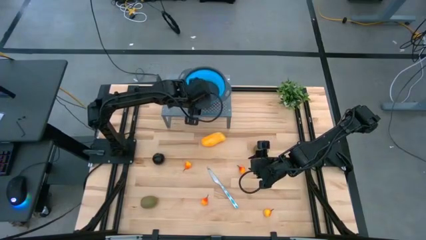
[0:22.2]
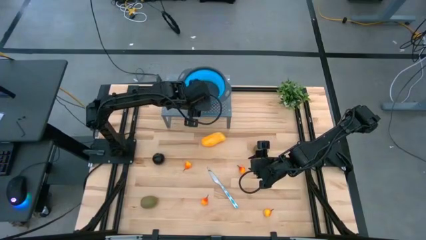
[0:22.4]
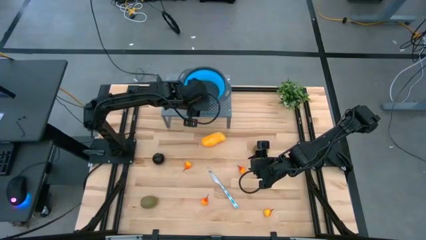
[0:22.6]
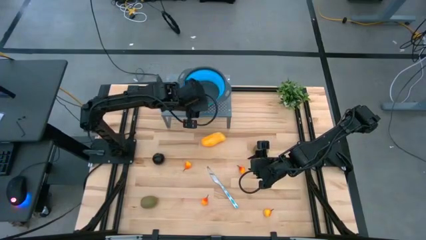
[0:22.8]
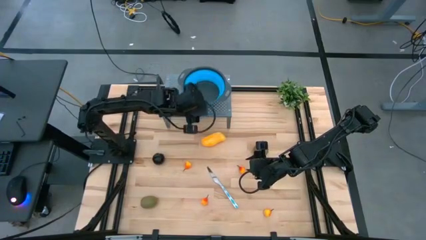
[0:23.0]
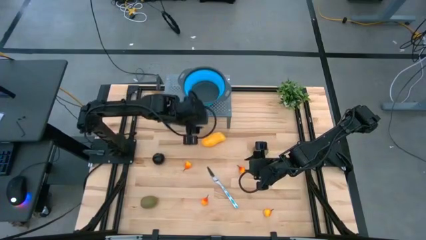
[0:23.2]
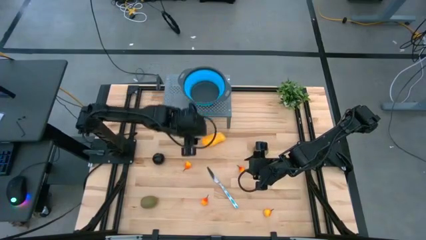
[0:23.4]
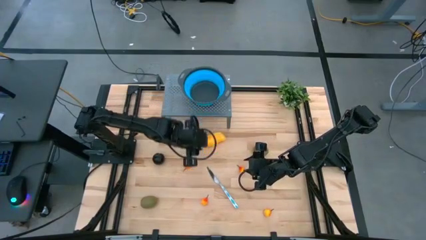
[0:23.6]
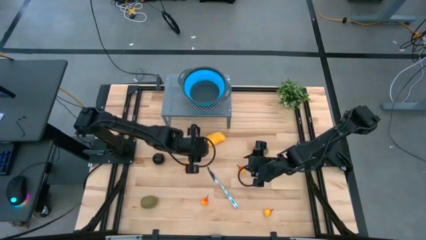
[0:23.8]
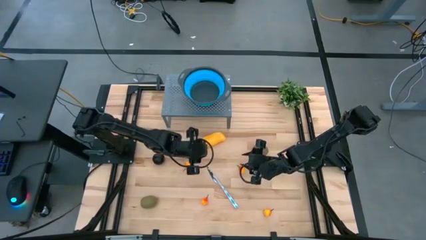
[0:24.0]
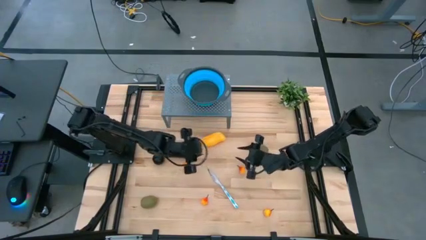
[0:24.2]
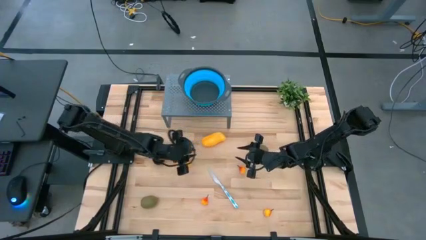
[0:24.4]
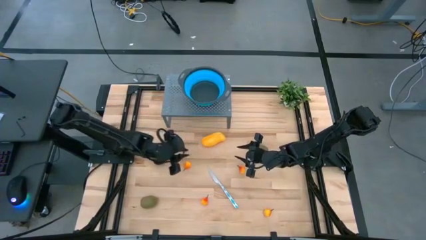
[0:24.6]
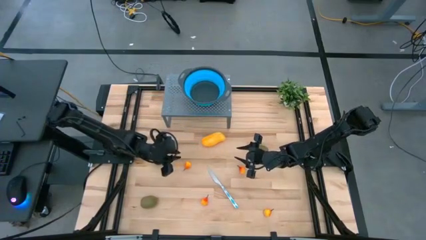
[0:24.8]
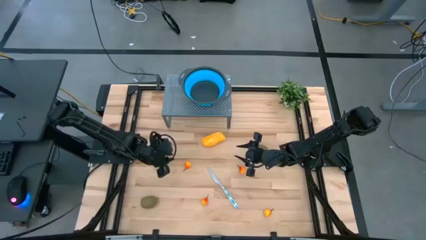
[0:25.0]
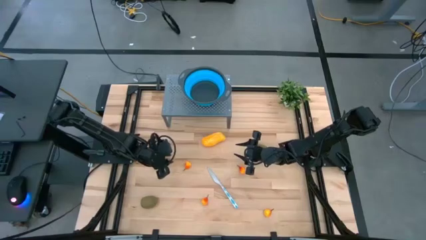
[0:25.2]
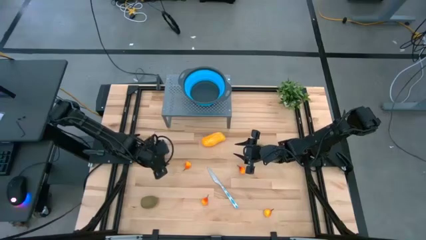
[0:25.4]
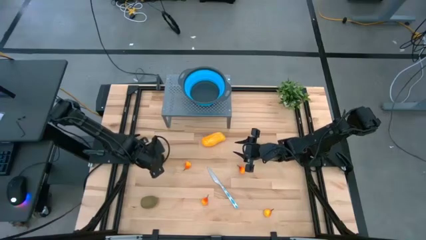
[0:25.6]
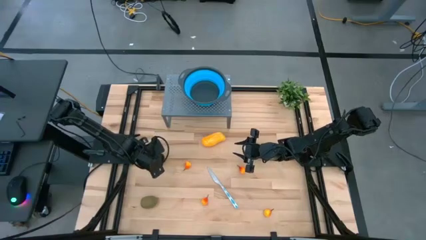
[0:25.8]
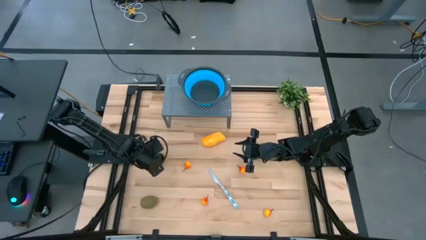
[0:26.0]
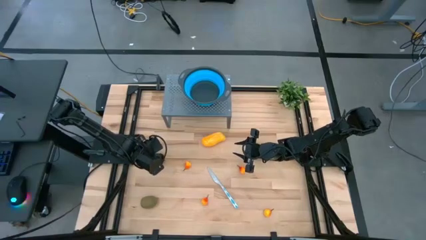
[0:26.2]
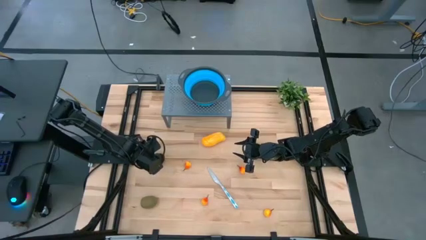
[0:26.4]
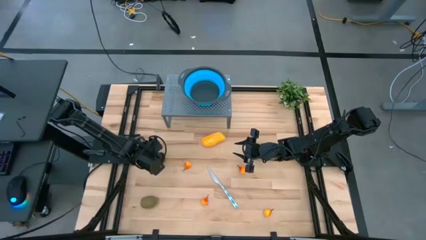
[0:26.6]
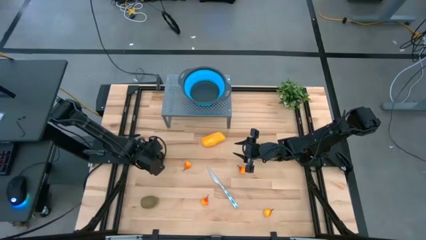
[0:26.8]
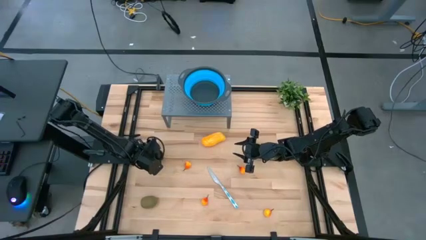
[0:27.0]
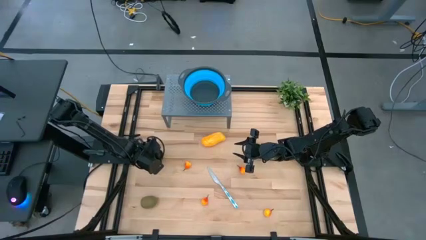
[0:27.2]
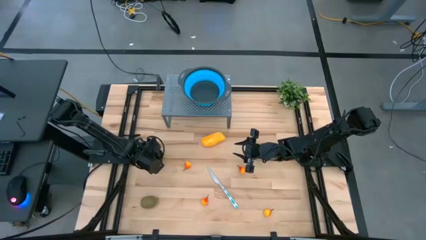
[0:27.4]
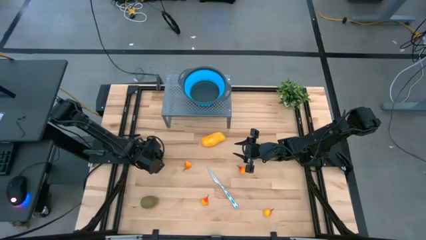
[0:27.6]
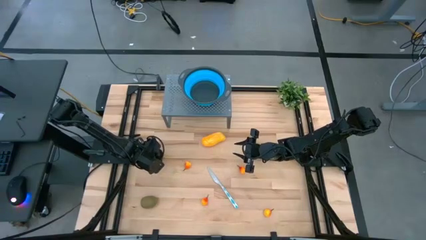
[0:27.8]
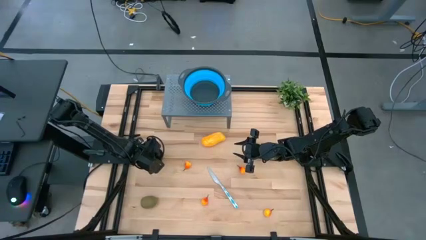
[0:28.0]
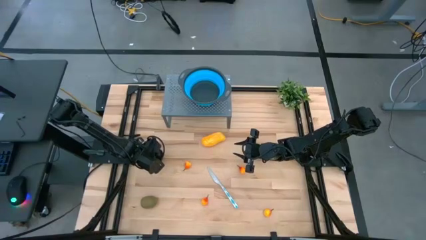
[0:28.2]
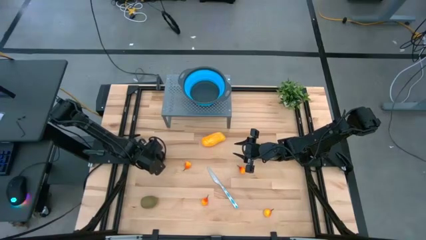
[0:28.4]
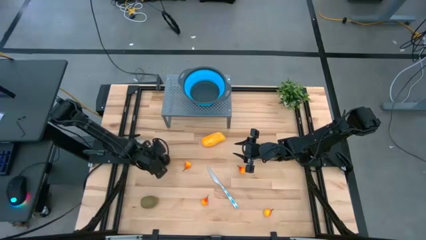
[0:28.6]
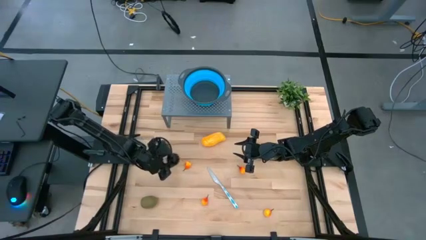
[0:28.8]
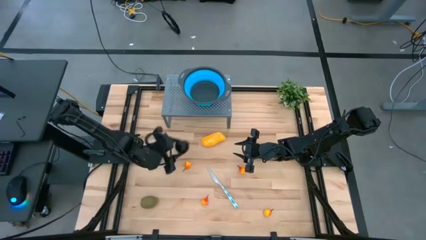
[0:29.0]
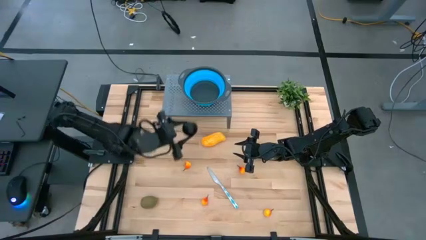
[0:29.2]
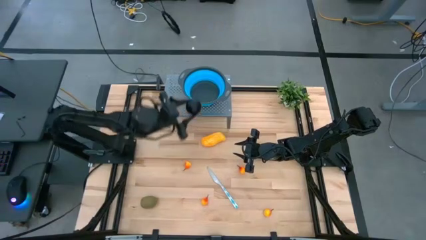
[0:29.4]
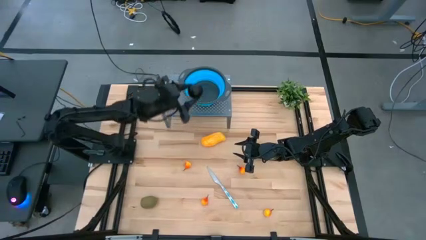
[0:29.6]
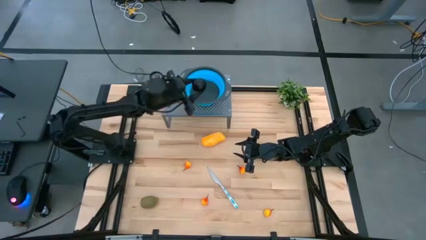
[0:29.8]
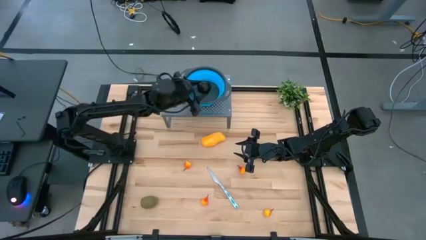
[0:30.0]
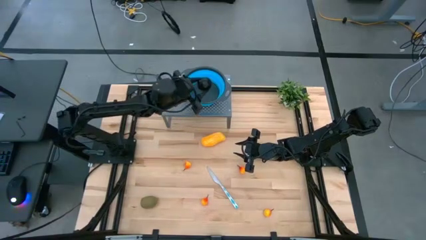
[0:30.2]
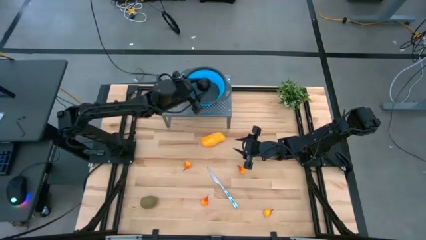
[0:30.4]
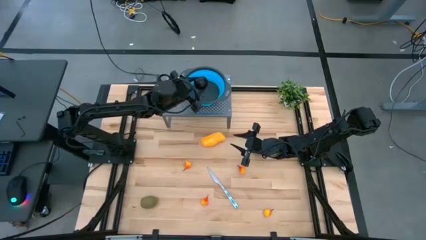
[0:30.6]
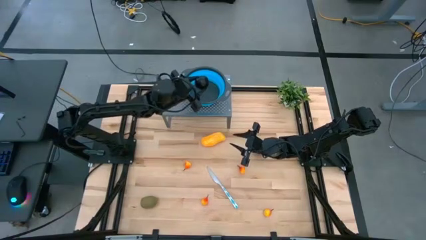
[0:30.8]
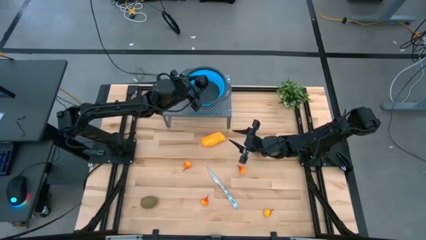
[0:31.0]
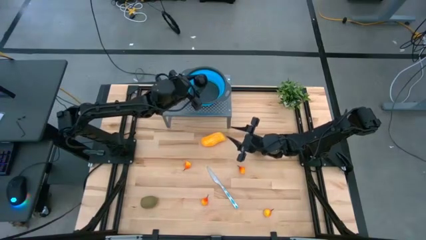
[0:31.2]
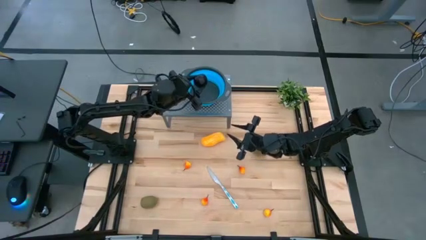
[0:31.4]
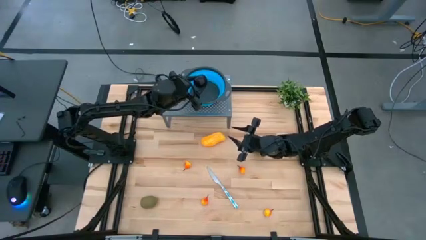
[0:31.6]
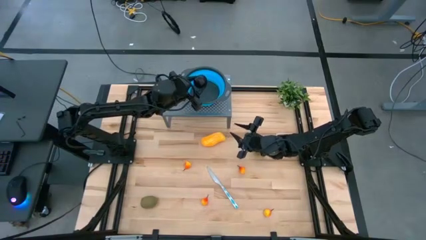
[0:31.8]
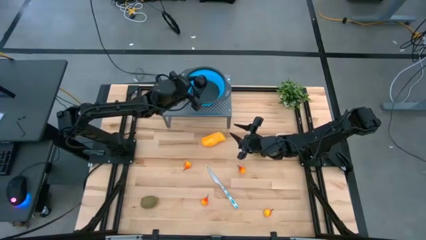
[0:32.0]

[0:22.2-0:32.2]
Task: Pick & Place Fruit
Put the black plum into the blue strainer bowl on the shelf

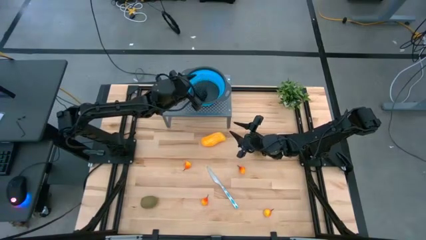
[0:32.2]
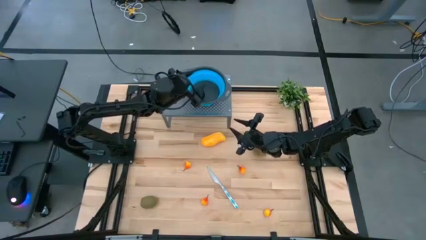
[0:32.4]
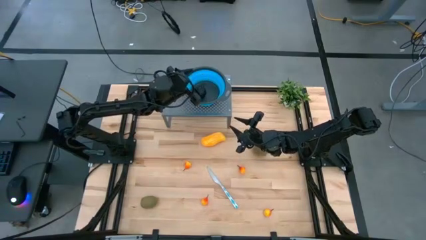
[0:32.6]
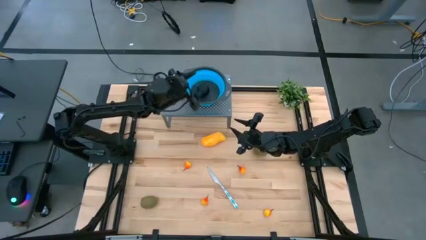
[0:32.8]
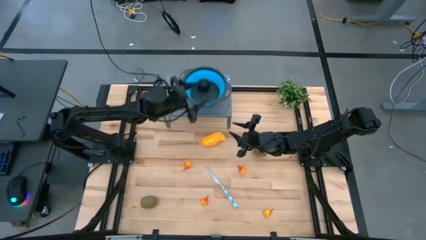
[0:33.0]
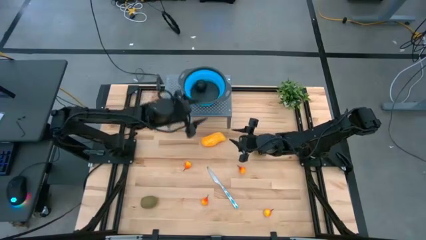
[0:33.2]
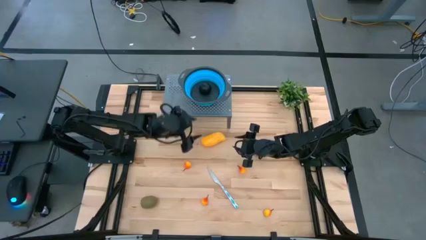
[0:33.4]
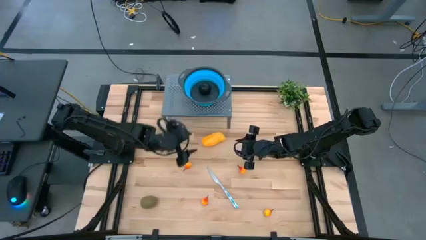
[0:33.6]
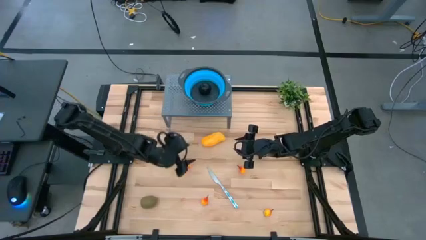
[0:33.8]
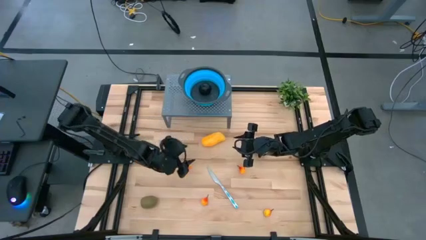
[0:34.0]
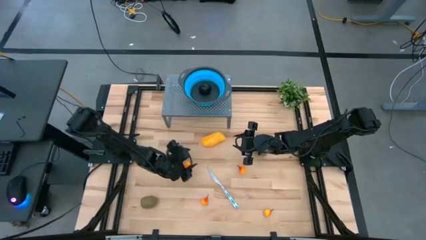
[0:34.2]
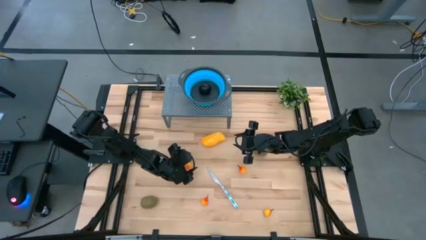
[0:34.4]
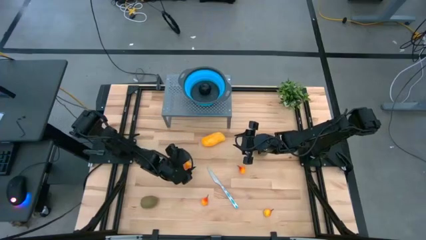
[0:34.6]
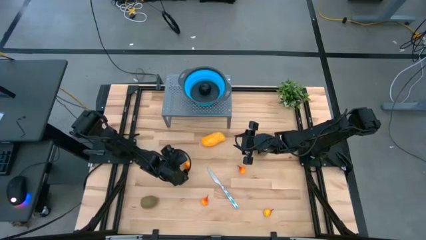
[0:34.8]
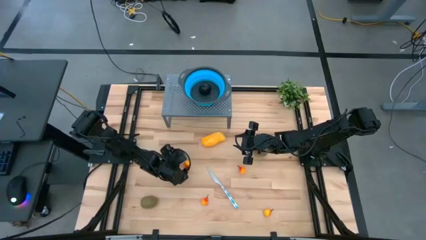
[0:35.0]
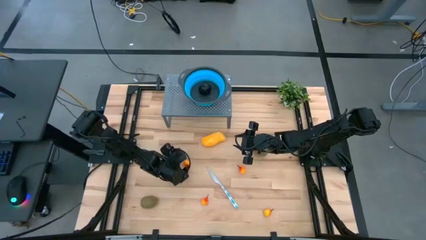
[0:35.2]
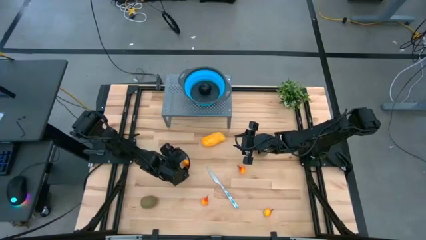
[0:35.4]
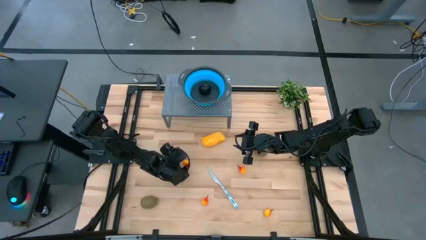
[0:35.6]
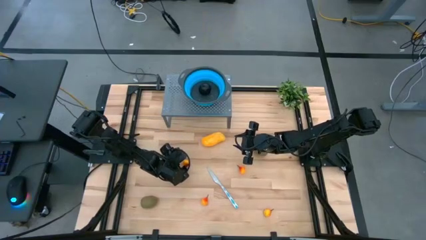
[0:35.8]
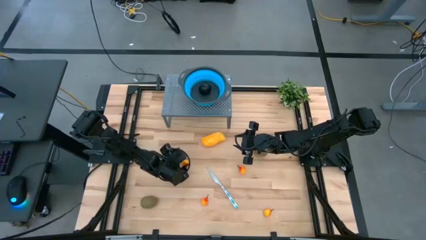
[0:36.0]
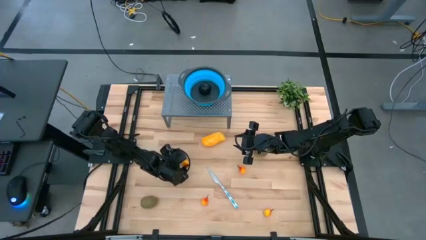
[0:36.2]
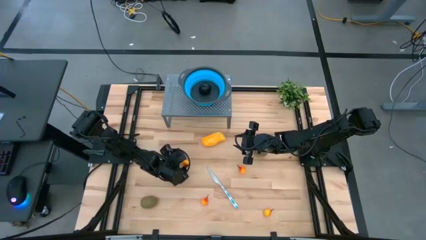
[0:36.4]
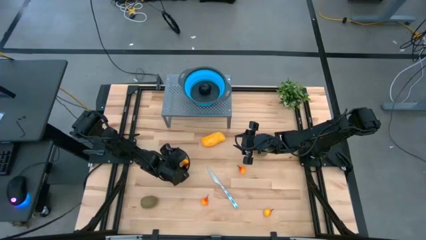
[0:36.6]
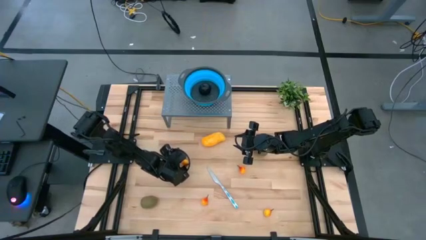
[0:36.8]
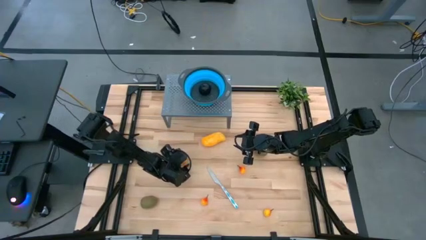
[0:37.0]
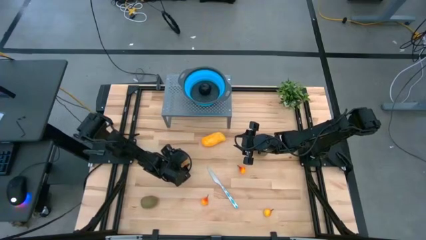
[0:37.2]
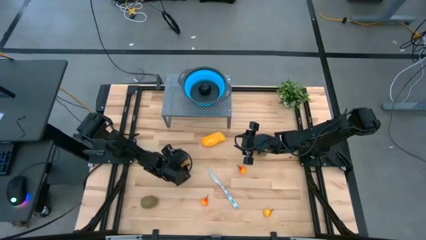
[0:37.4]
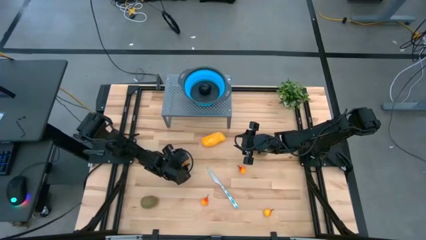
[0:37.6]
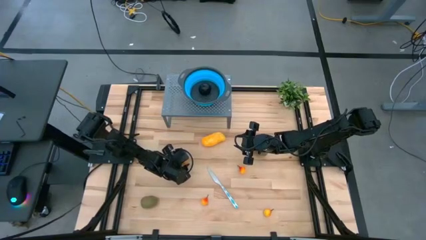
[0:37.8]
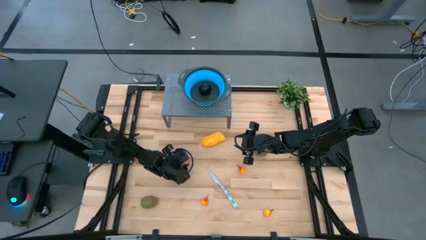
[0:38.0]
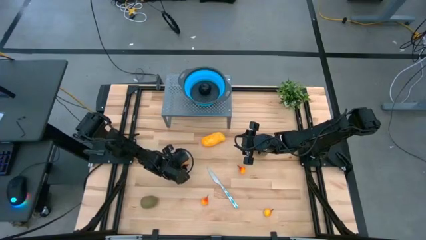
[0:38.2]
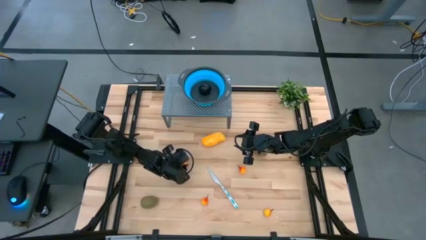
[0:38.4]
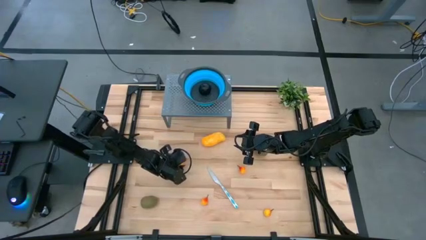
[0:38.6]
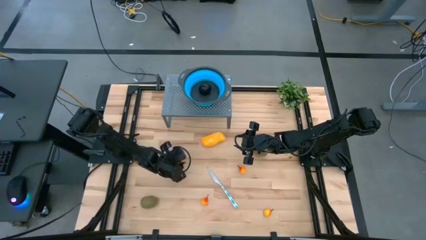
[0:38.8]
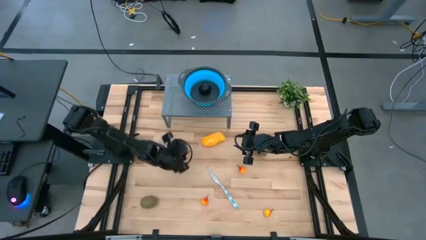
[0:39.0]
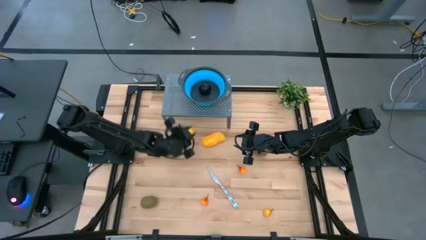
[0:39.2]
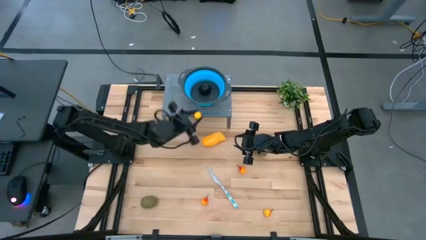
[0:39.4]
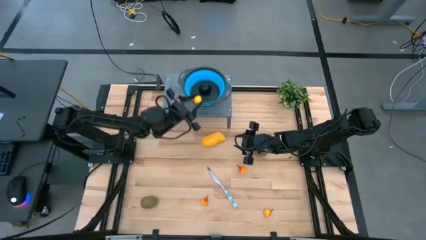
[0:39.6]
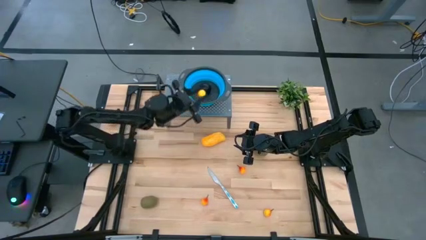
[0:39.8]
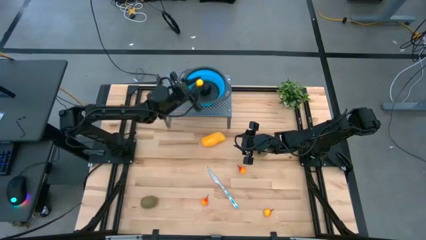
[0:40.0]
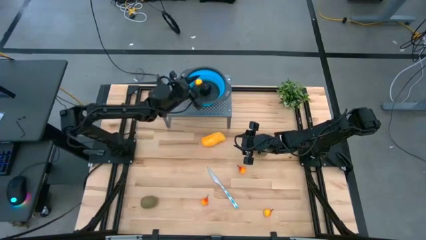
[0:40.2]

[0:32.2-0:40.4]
Put the orange pear into the blue strainer bowl on the shelf
